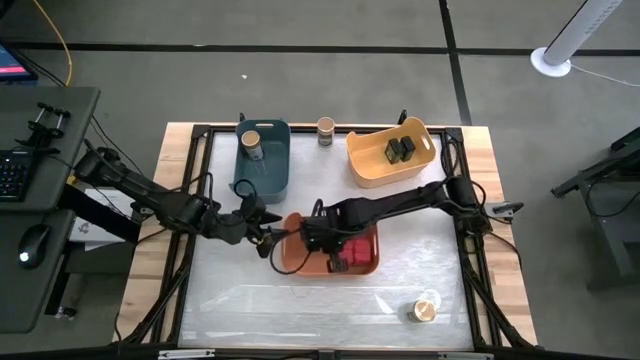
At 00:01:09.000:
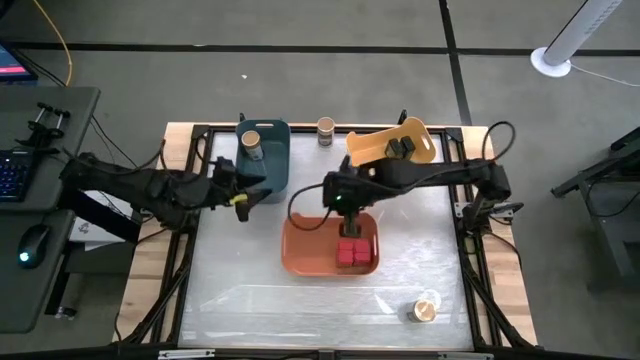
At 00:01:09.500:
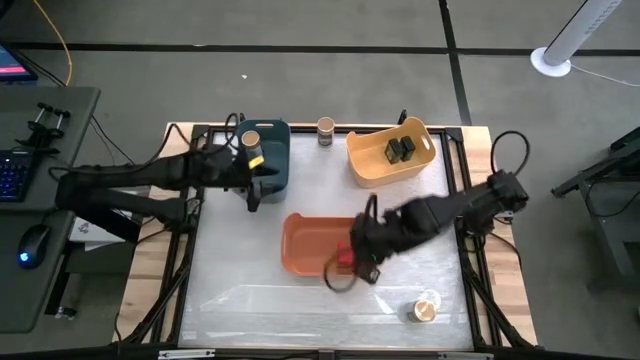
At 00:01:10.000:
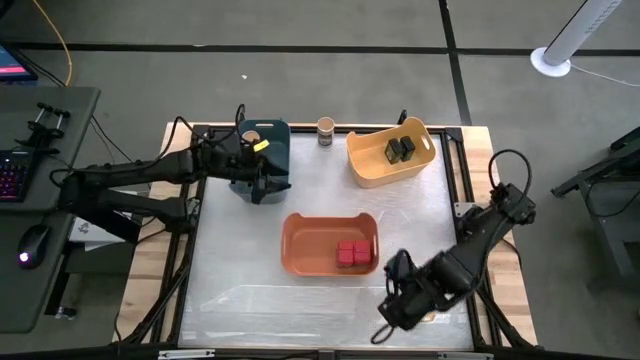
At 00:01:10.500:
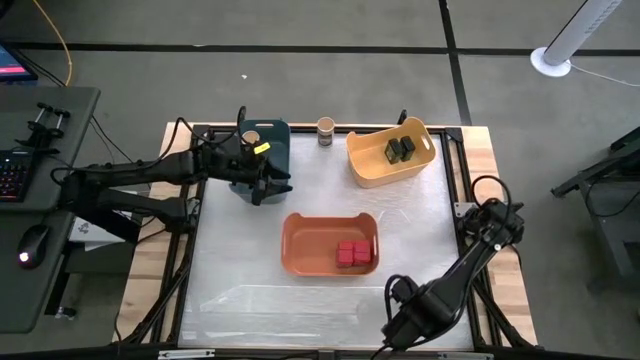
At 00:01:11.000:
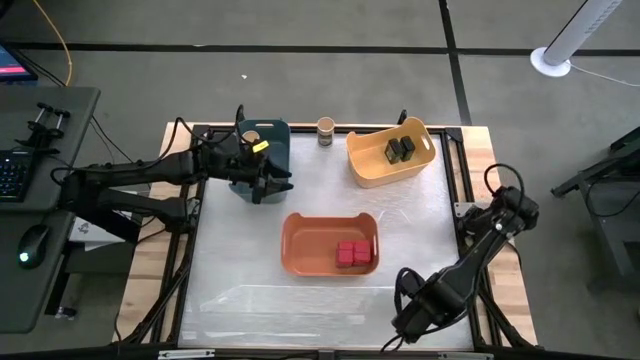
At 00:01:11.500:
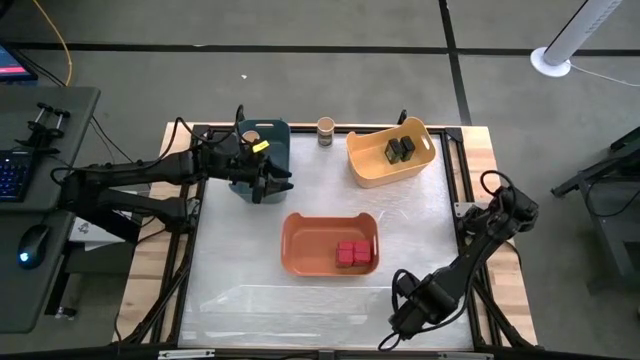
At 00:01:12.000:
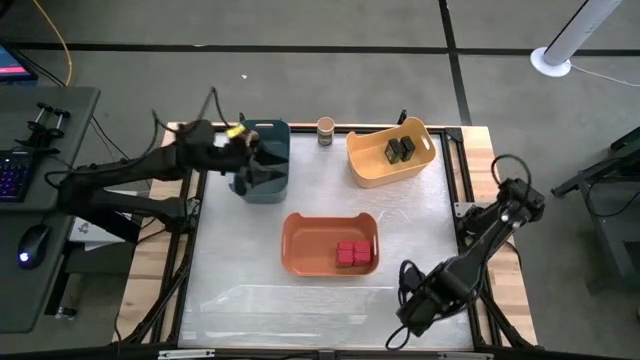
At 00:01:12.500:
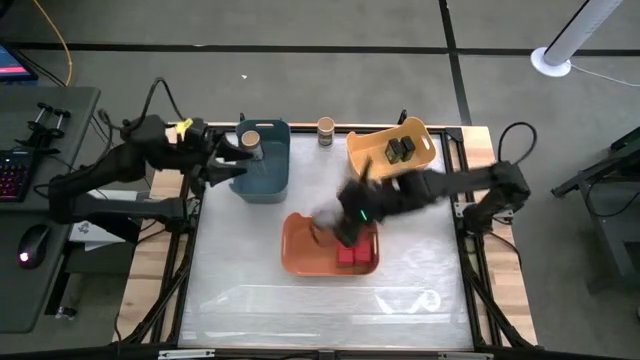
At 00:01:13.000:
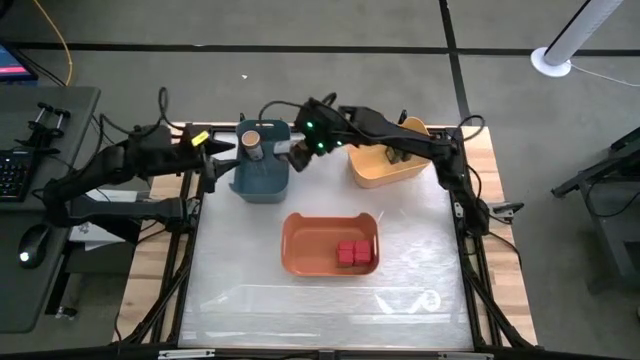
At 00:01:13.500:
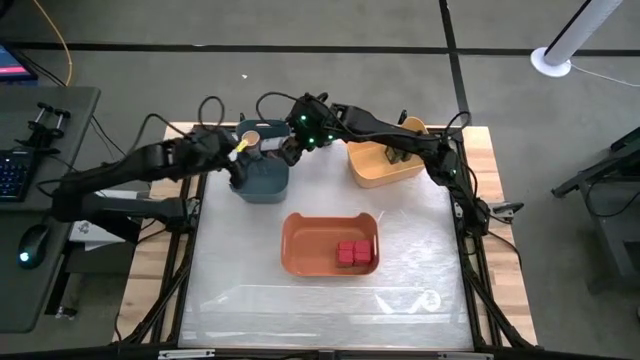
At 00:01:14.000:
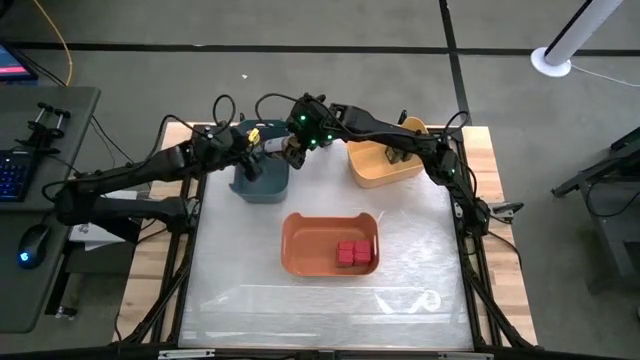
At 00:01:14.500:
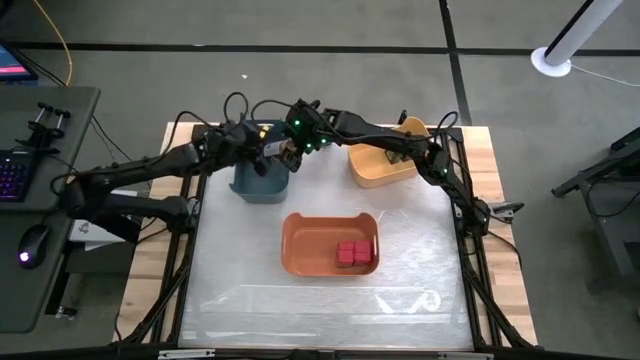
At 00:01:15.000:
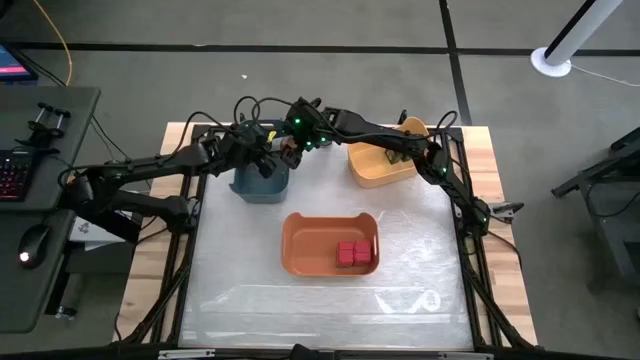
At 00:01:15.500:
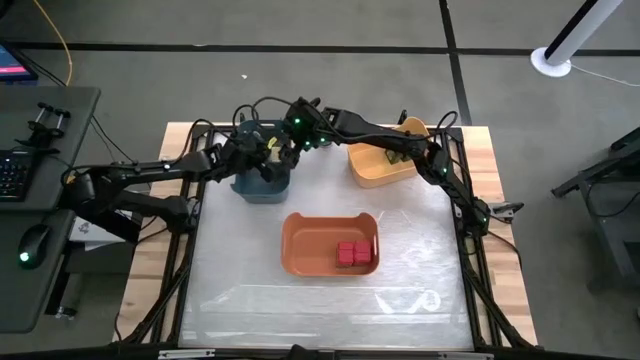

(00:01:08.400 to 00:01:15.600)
Task: Sort spices by type
Put the bottom gold seasoning bottle into the green bin

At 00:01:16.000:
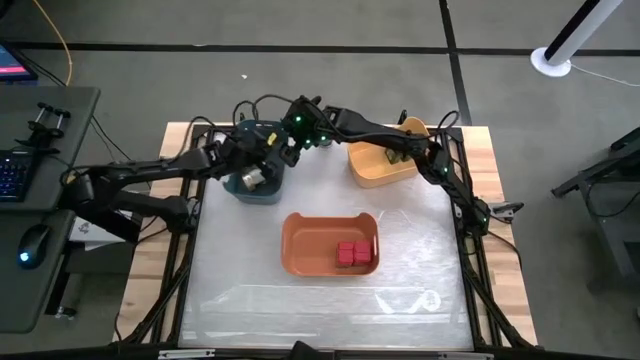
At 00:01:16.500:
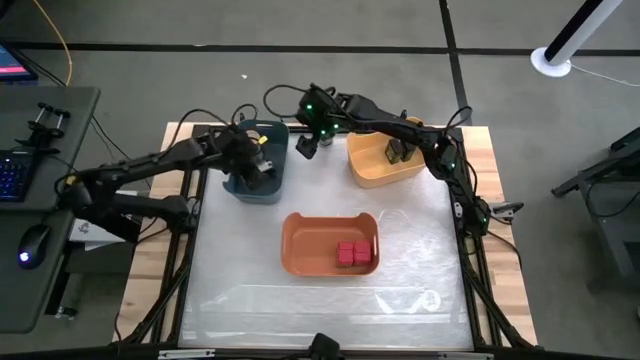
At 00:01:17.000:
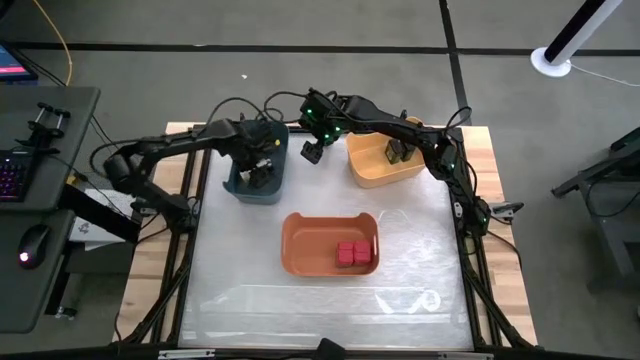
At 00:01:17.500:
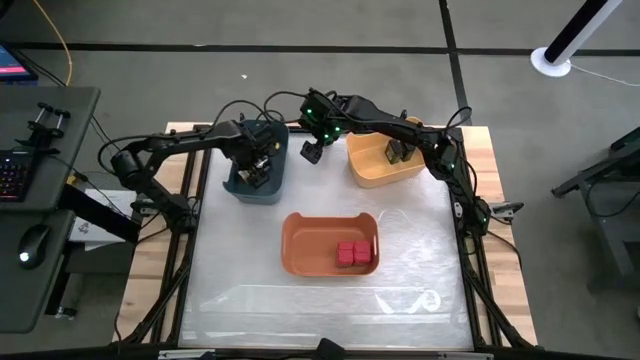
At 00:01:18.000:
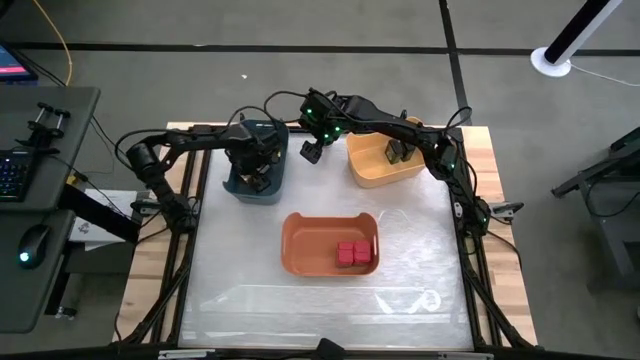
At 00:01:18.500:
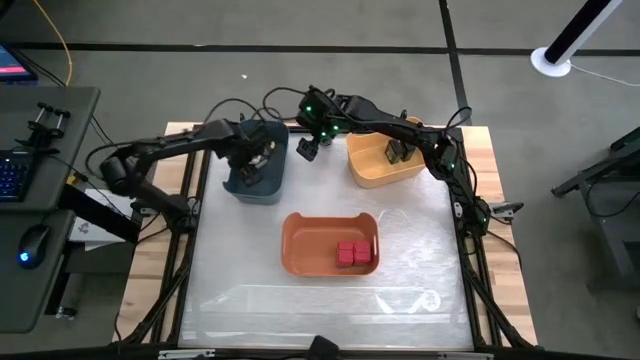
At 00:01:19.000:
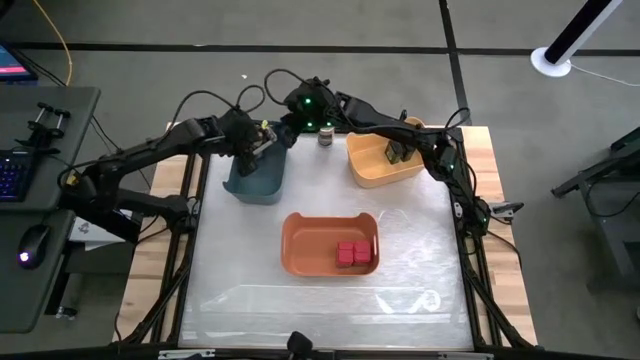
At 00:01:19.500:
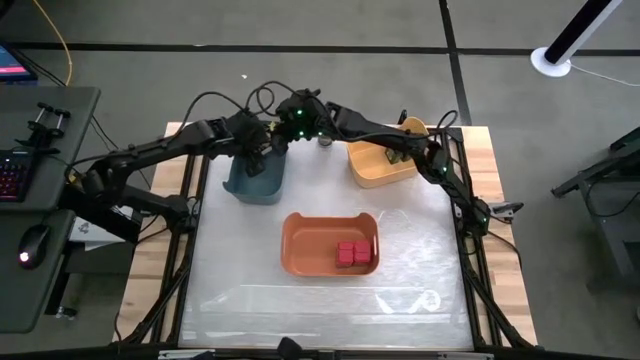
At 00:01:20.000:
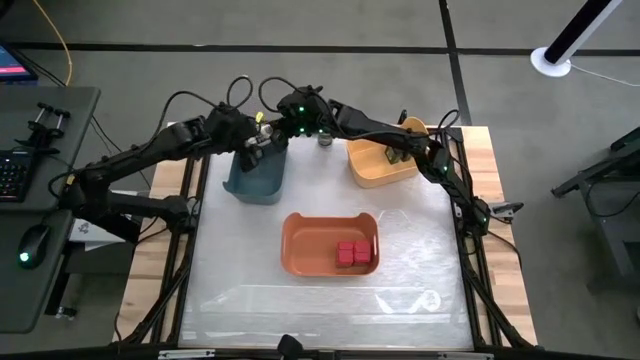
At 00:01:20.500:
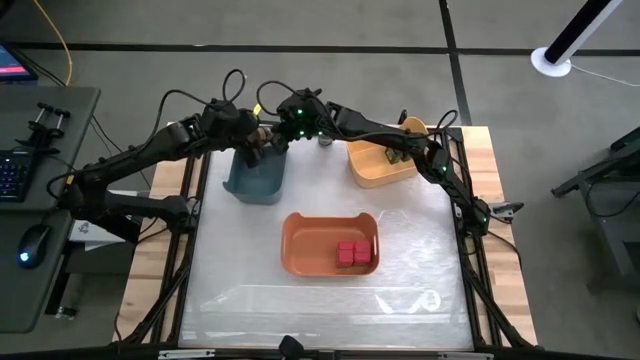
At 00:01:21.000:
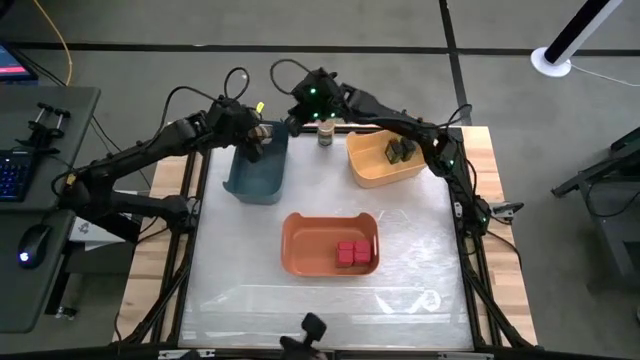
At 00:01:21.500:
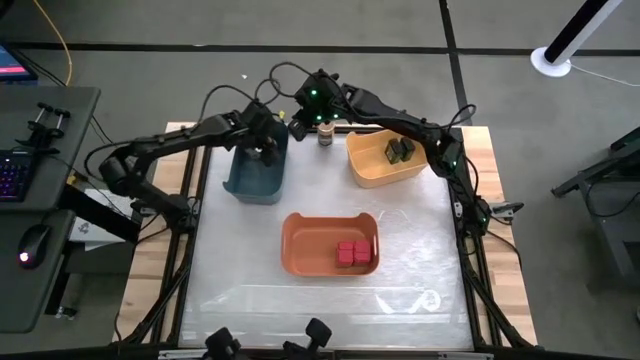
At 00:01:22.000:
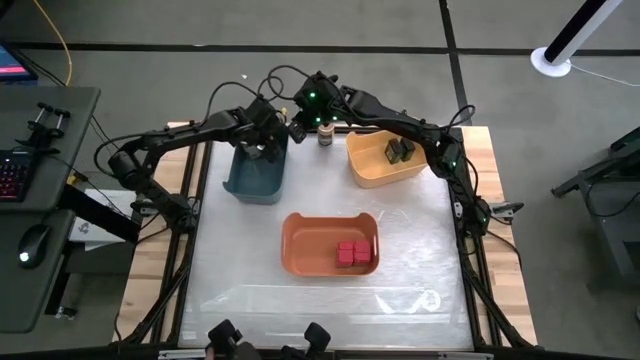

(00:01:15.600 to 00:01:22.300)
Put the bottom gold seasoning bottle into the green bin

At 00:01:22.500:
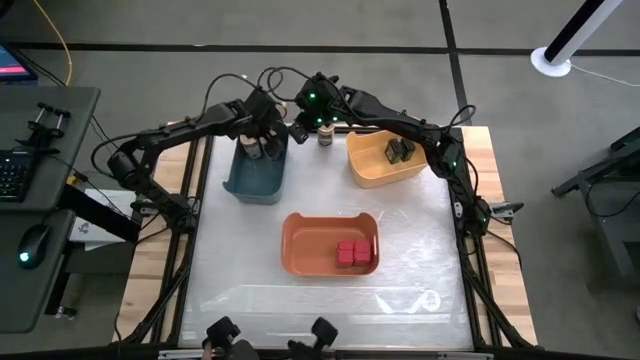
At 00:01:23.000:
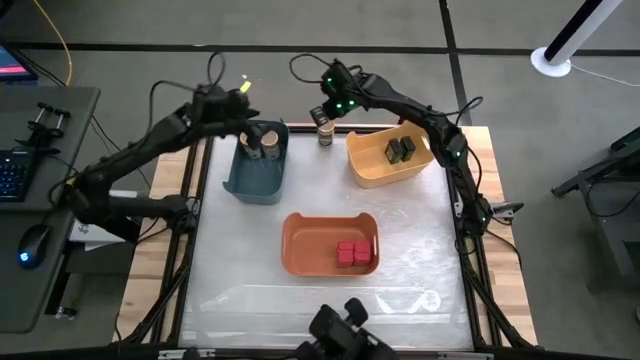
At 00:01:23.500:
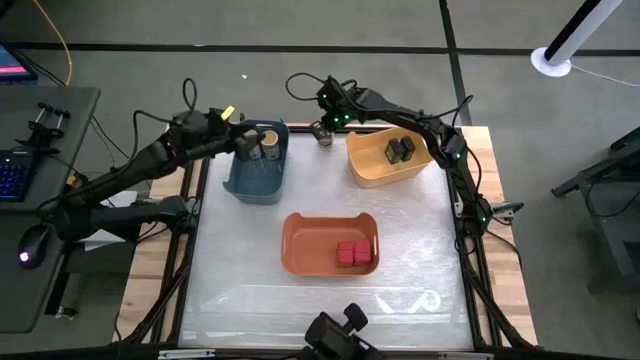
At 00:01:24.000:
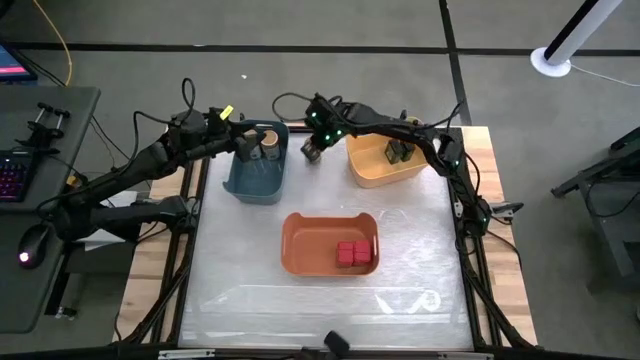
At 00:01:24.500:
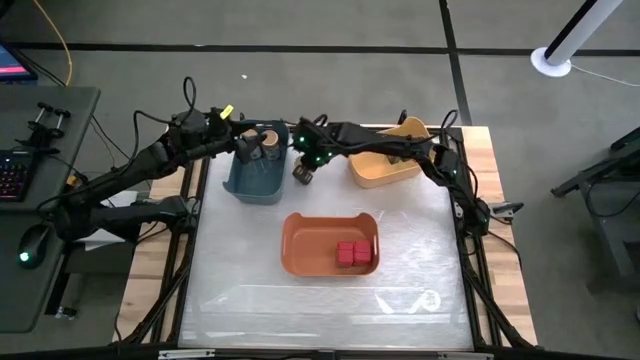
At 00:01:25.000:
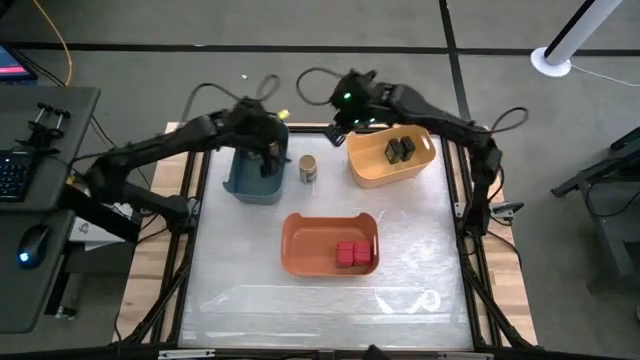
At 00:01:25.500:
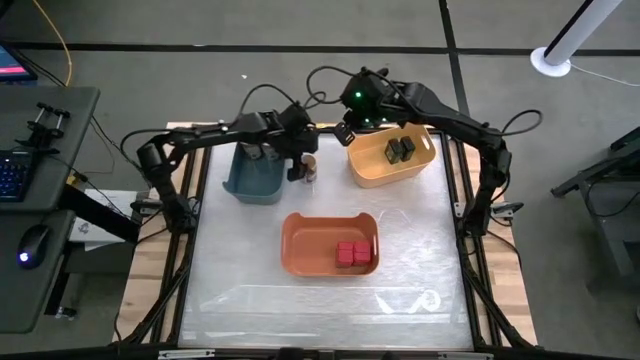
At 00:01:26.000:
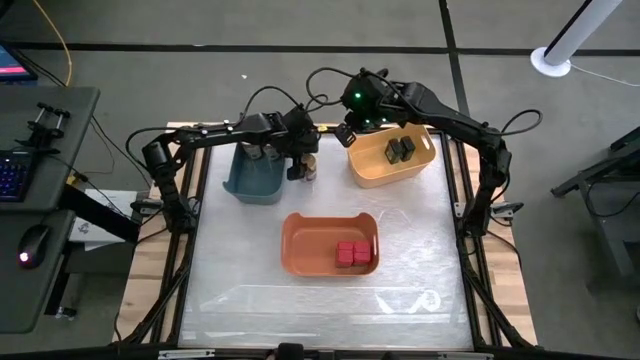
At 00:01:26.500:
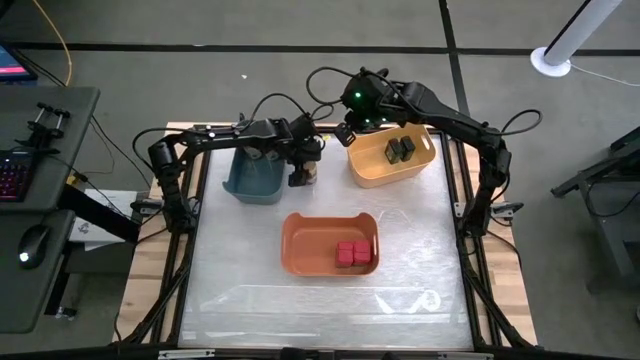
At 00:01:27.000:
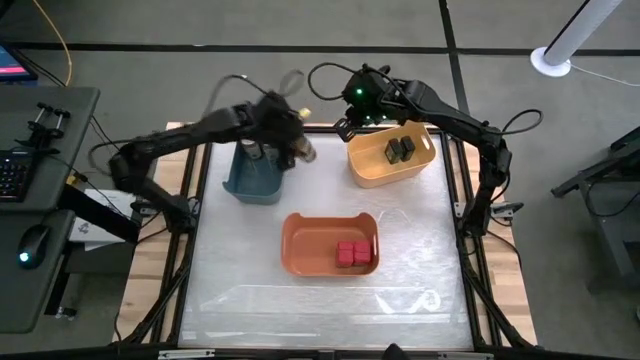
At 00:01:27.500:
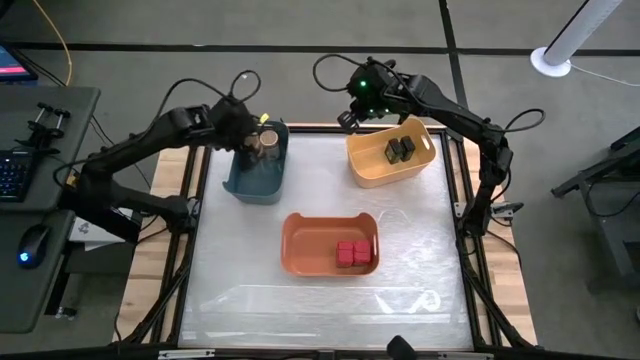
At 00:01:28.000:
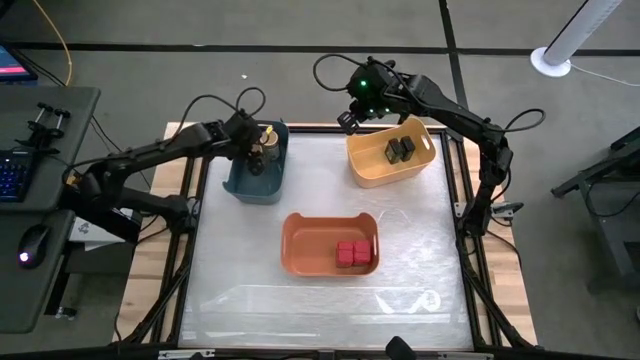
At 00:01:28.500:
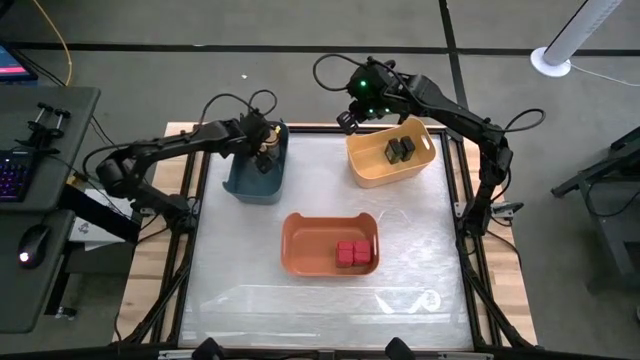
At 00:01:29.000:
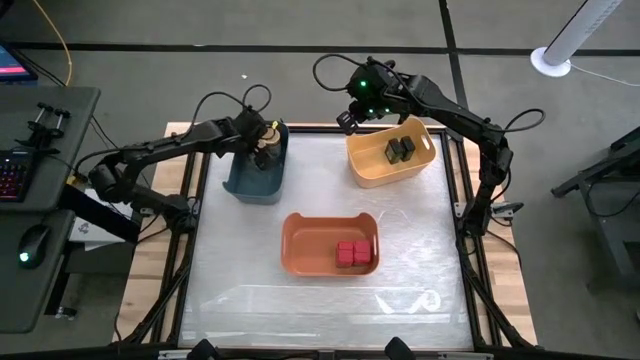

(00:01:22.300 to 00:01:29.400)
Put the gold seasoning bottle into the green bin

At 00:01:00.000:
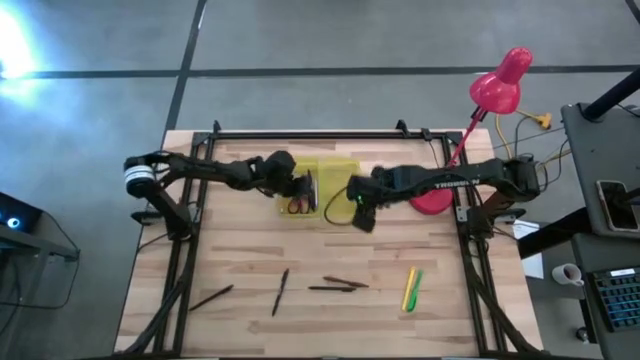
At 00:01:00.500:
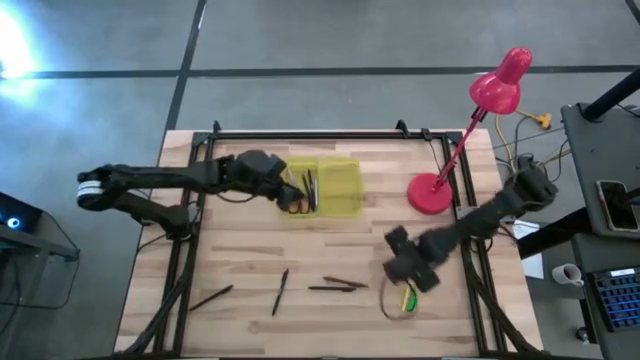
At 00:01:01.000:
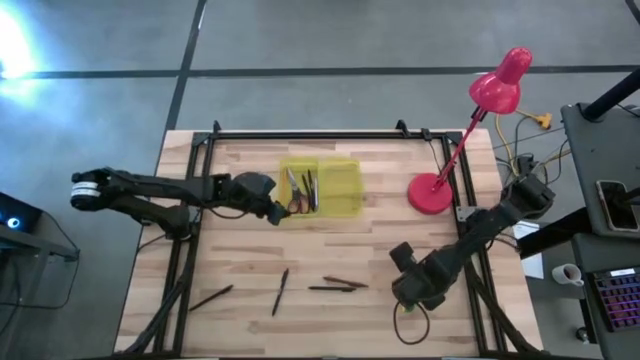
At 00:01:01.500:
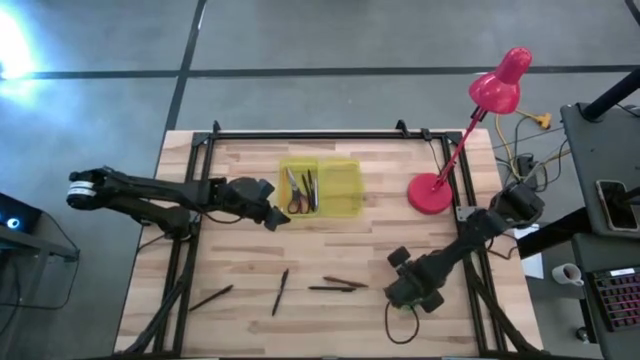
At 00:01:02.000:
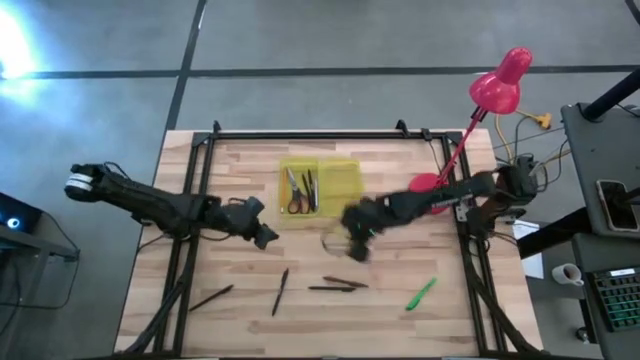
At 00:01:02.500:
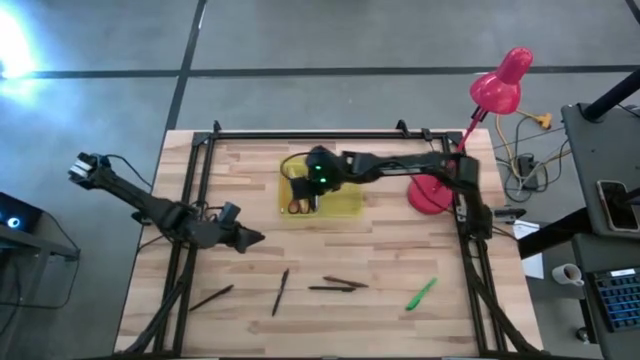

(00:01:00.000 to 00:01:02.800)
Task: Pick & place school supplies into a supply box
Put the yellow pen into the supply box
